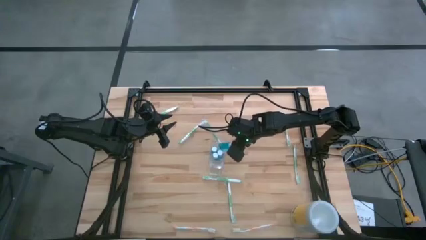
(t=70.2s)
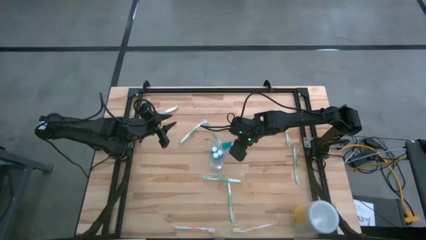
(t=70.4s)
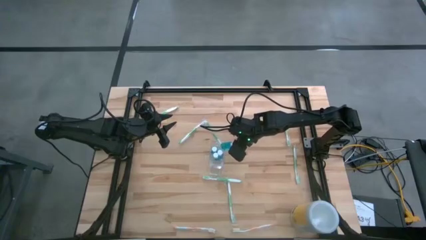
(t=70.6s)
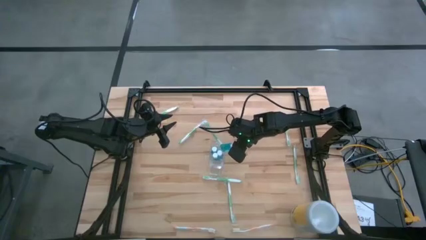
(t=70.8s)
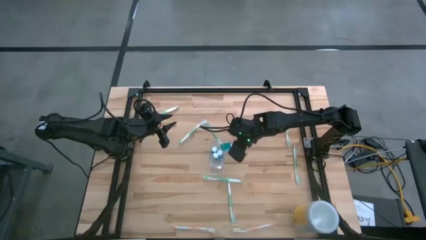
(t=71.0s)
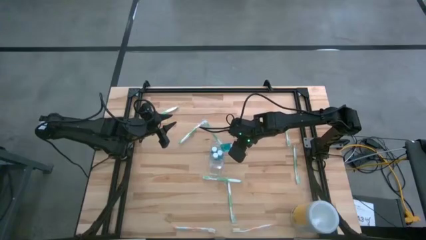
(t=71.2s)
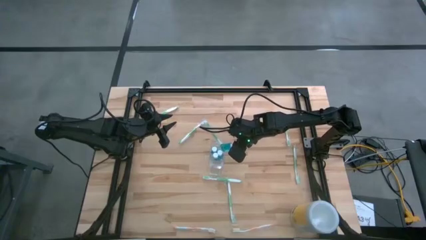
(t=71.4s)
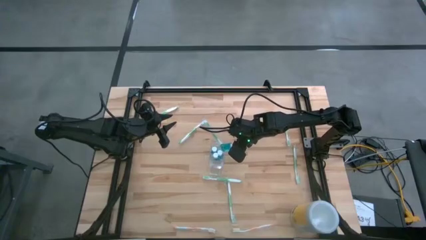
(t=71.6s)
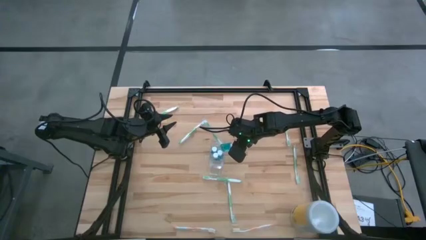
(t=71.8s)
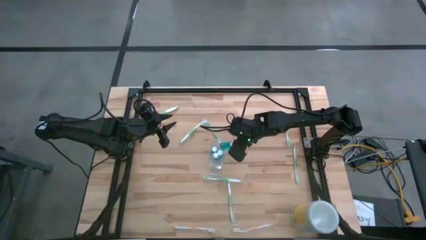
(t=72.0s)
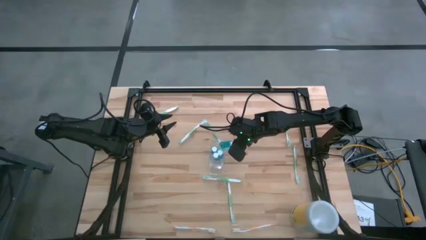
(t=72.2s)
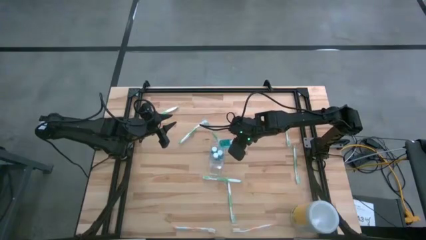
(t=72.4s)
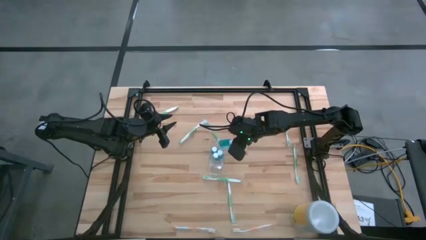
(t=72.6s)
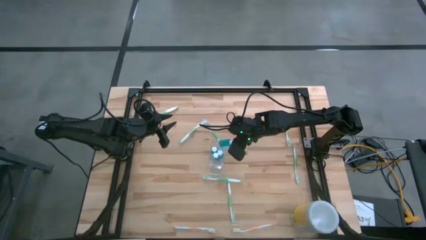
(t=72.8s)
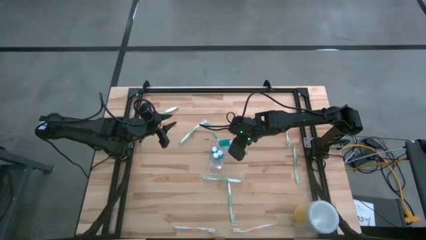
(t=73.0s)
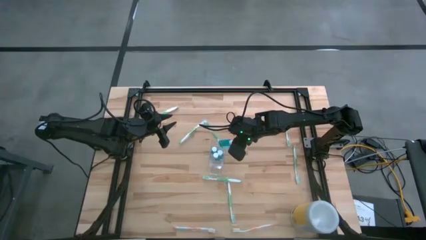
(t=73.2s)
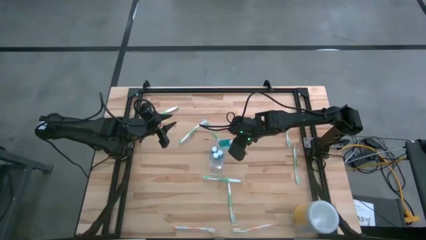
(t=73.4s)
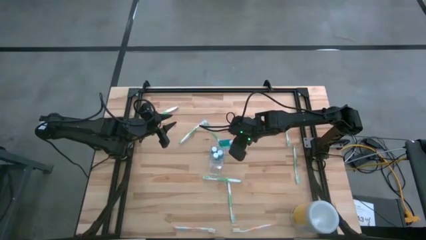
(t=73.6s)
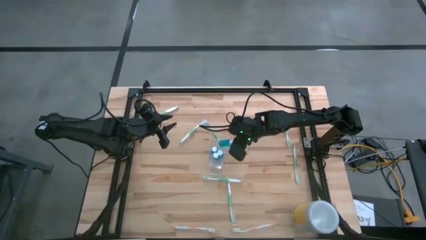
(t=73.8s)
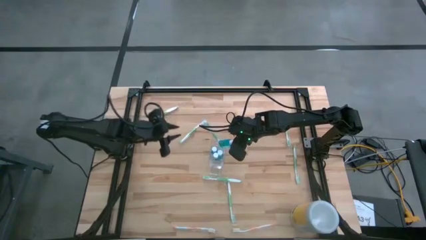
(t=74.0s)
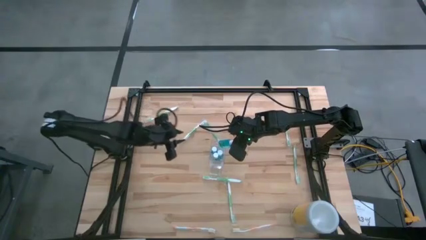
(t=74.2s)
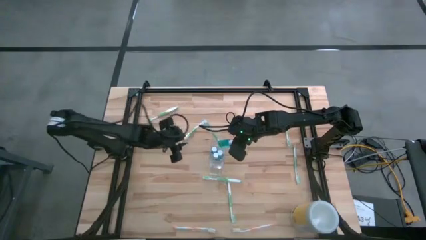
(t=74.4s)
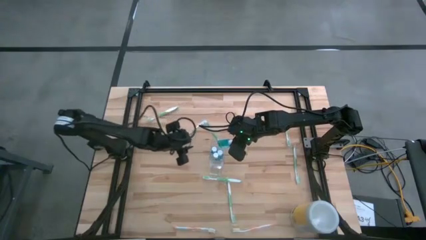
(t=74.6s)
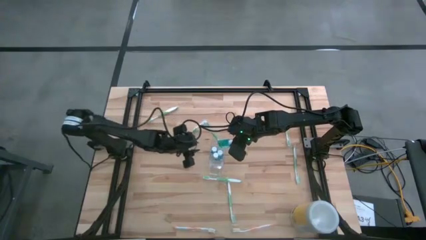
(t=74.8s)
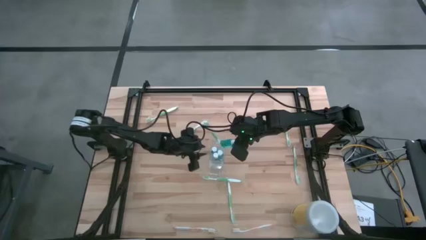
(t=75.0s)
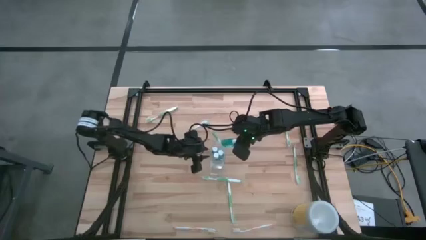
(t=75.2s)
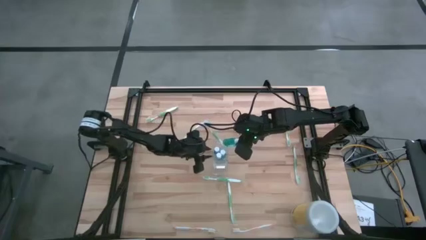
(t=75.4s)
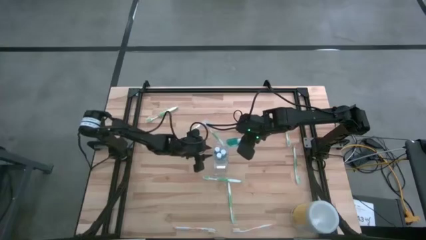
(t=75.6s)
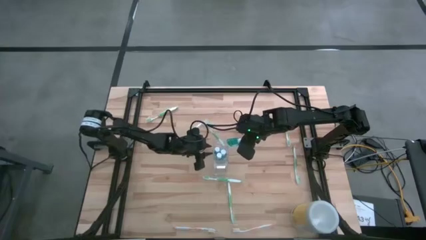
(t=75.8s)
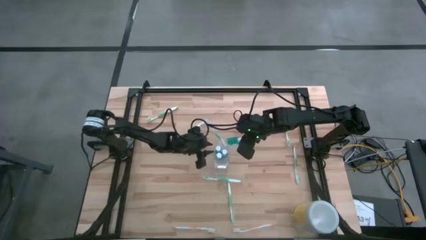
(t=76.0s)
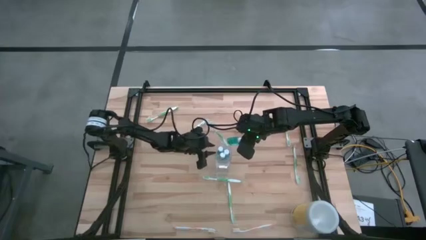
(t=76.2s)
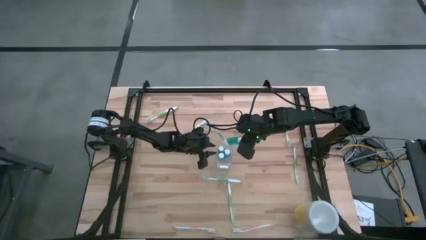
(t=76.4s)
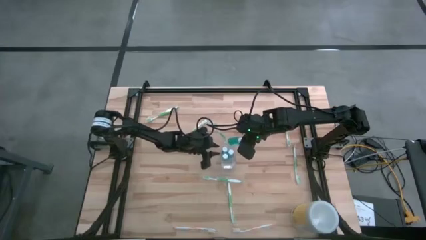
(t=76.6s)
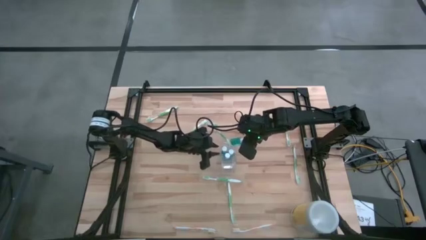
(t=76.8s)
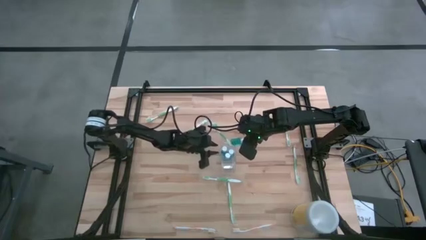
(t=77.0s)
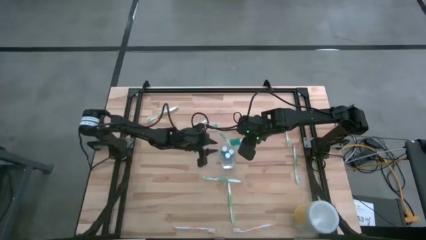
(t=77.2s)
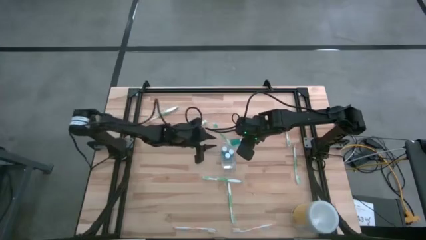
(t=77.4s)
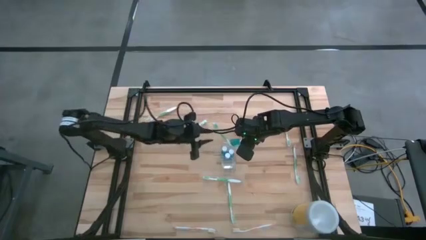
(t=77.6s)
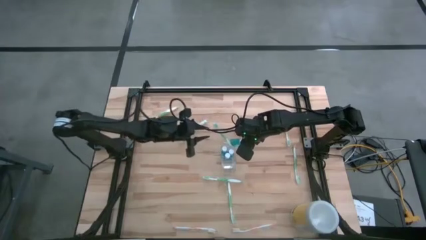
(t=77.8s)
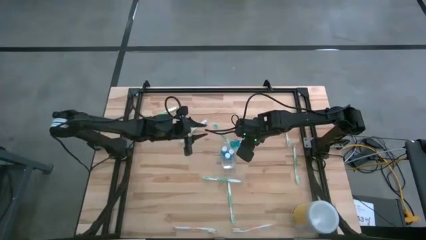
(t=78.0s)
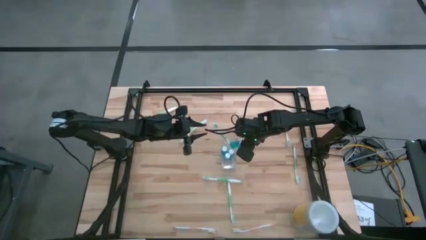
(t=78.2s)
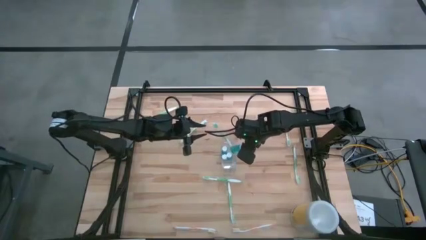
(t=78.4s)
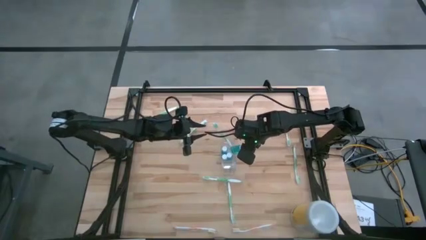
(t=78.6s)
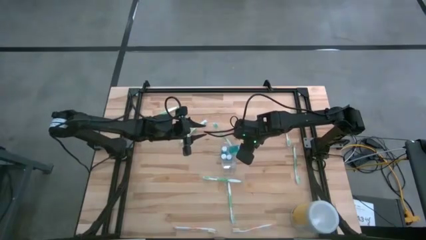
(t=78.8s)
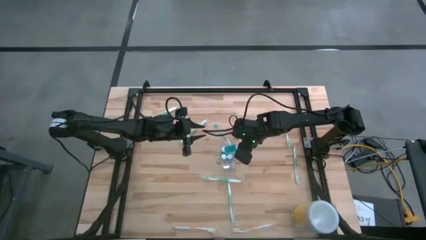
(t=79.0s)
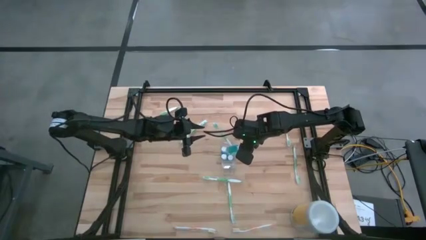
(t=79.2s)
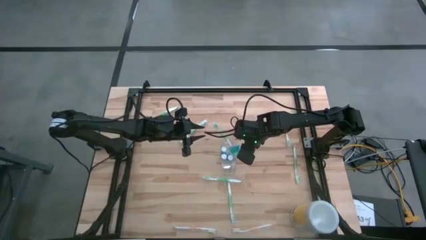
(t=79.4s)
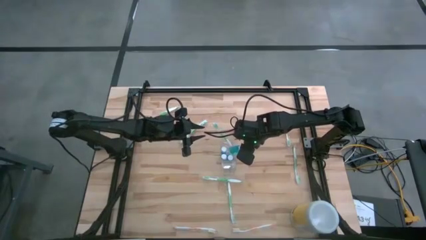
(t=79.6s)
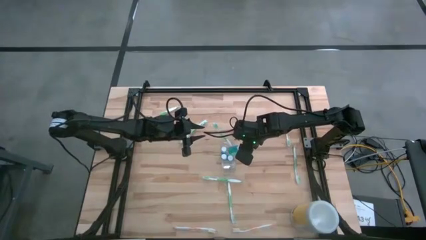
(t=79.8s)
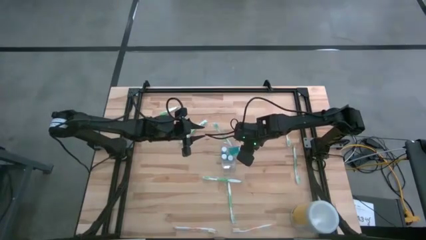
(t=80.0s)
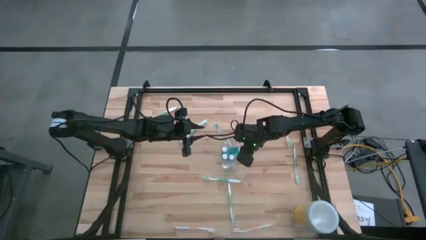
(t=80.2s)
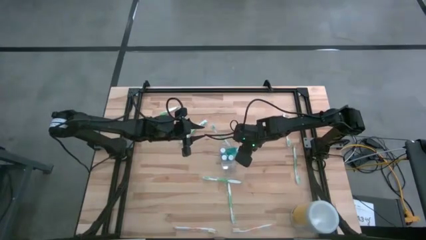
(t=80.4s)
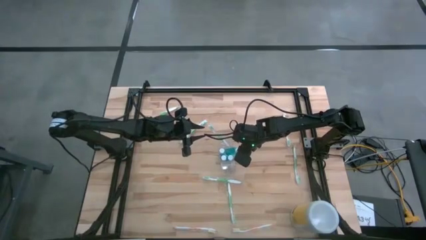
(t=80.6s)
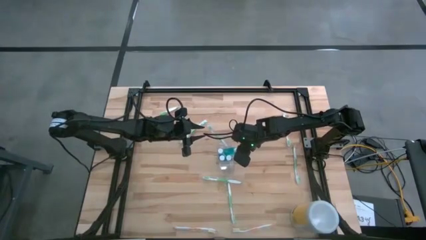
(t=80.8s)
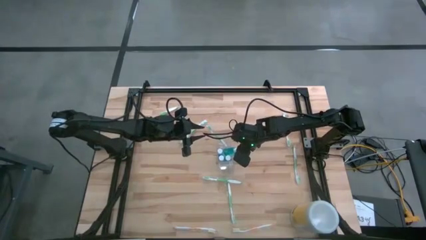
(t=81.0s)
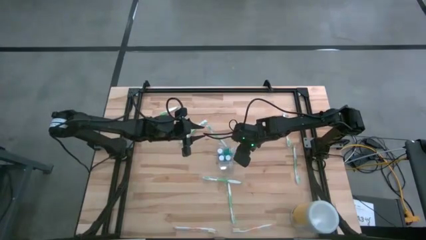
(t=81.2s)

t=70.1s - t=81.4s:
Task: Pick & Place toothbrushing station
Put the blue mouthwash bottle into the middle of the transparent organizer

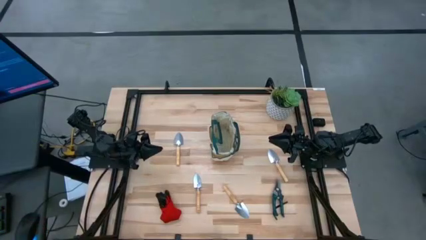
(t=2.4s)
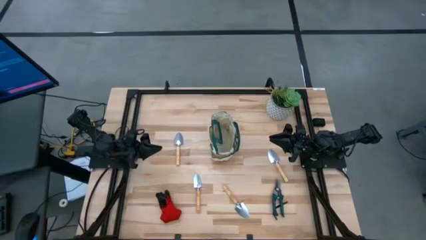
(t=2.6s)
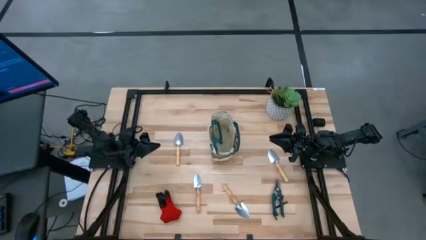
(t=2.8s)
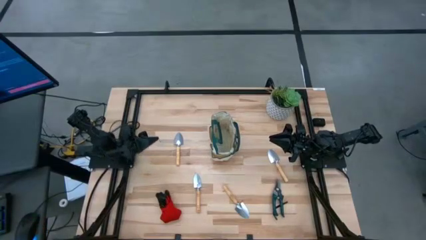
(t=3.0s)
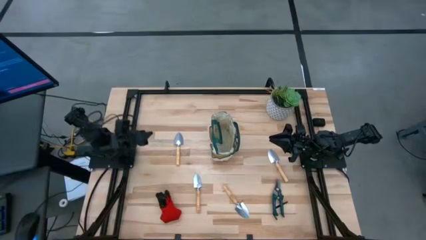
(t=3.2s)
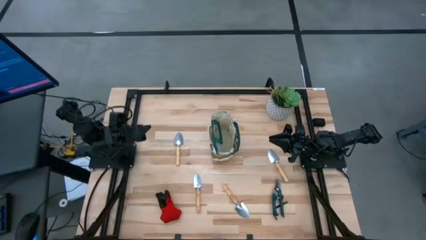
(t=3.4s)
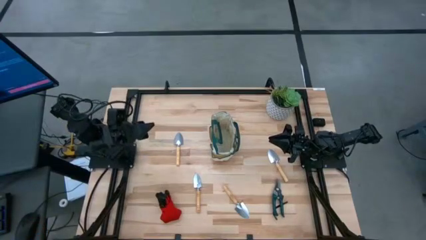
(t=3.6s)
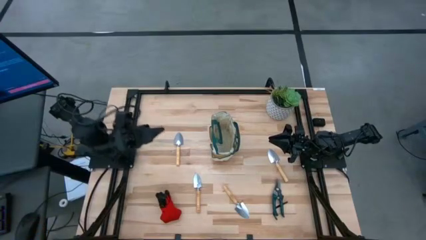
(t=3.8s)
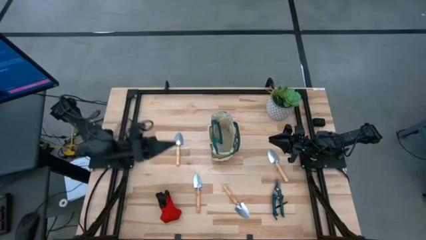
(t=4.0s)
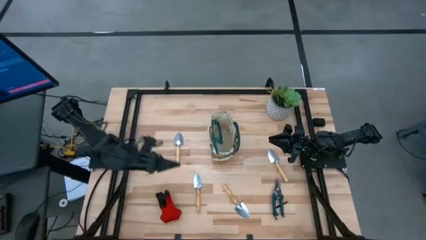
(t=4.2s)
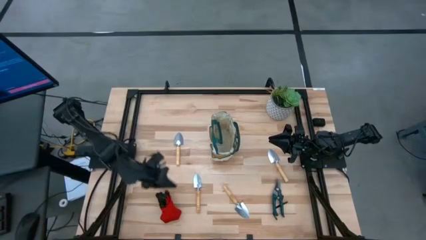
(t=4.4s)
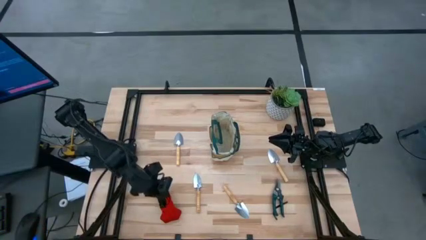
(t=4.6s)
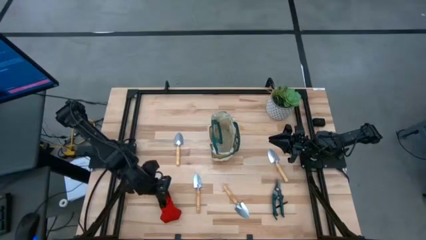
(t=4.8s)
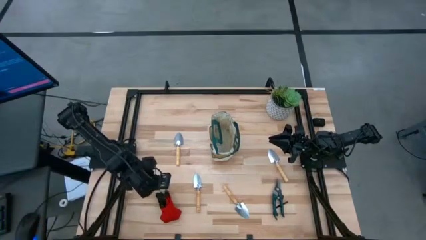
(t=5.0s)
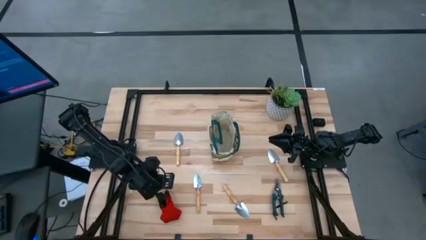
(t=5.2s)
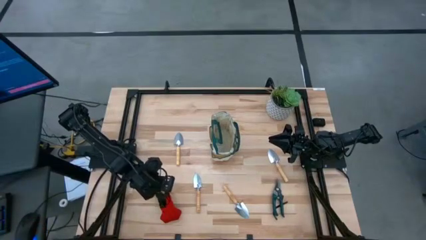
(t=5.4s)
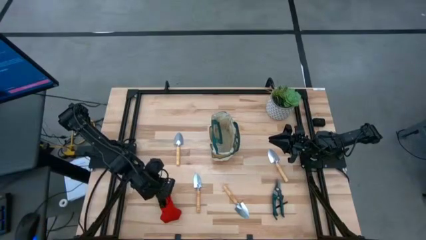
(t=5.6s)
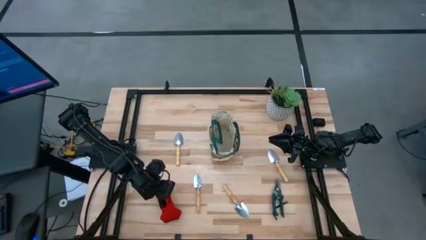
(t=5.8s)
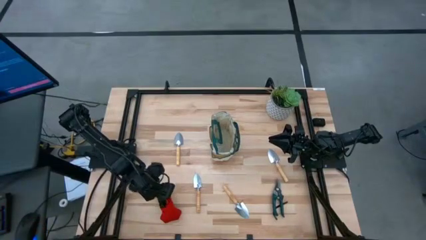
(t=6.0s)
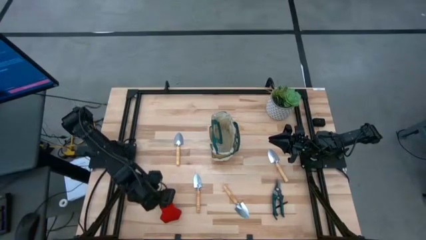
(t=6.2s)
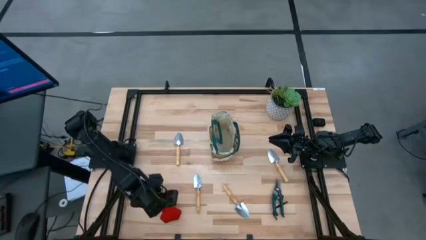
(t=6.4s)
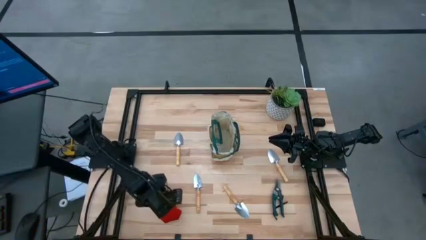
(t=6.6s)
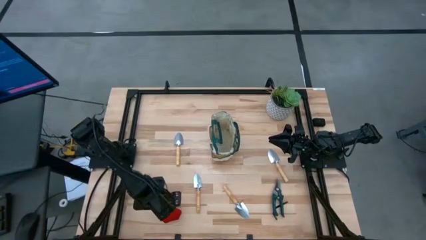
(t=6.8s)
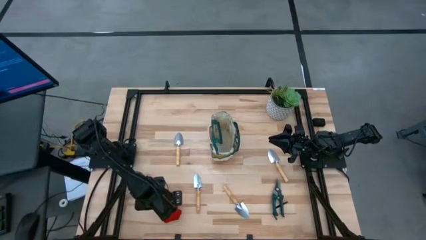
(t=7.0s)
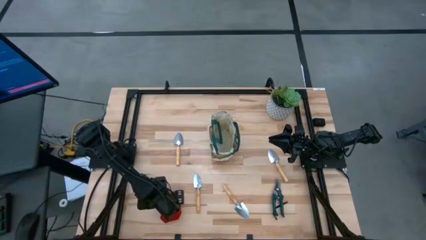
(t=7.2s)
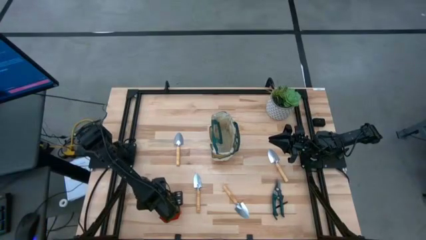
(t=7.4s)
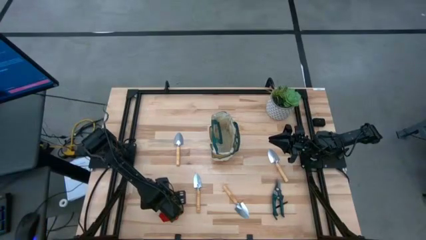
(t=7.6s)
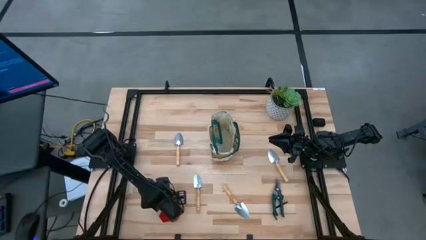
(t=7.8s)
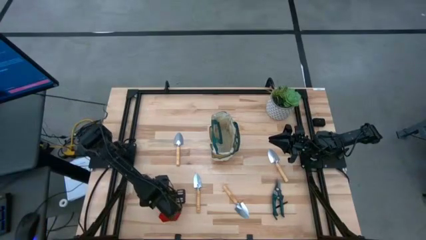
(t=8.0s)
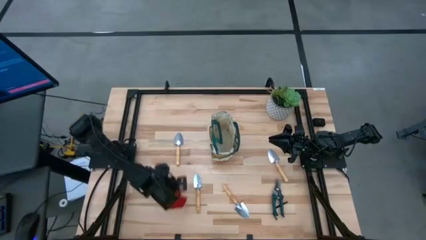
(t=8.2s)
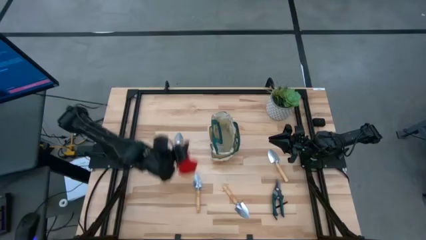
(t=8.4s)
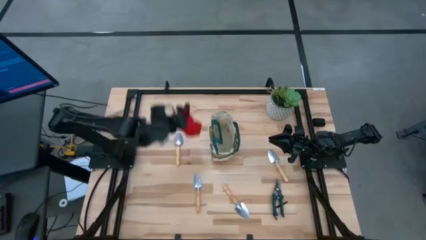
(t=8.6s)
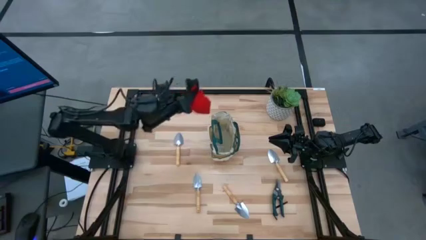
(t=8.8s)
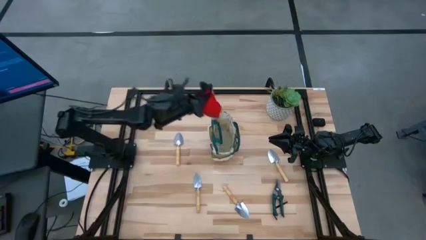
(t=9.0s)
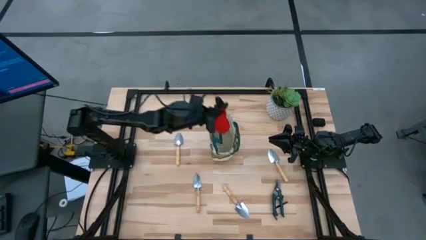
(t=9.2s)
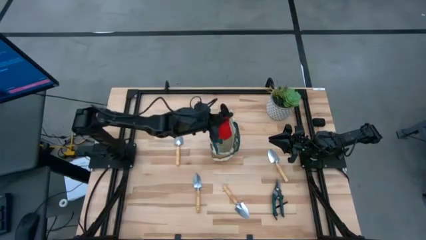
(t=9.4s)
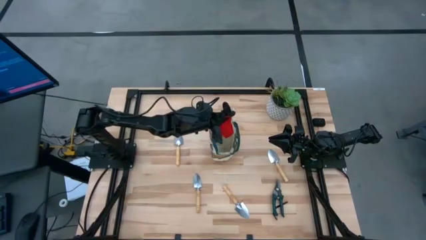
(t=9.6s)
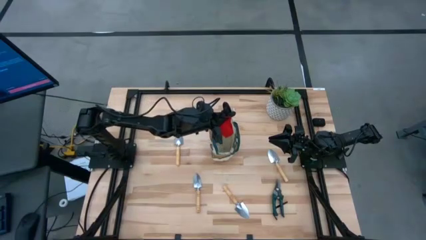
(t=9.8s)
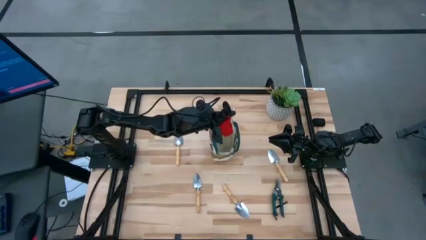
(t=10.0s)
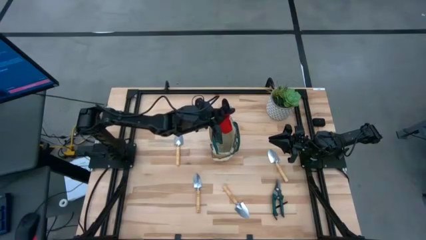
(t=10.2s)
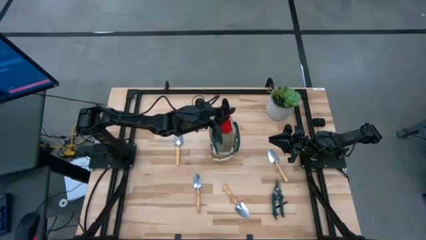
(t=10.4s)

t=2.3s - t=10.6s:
Task: Pick & Place Garden tools in Gardening bag
Put the red gloves into the gardening bag
